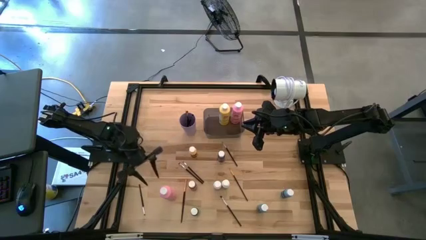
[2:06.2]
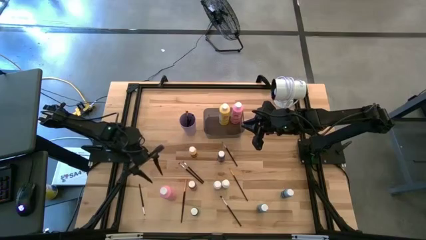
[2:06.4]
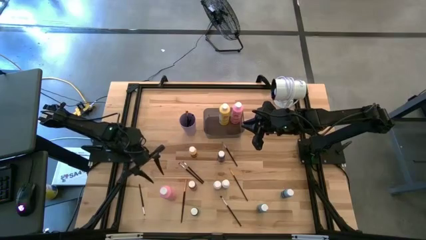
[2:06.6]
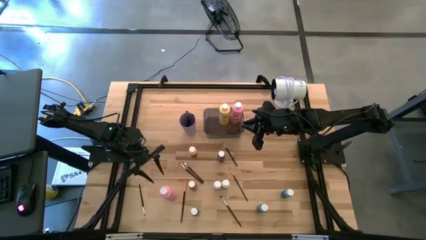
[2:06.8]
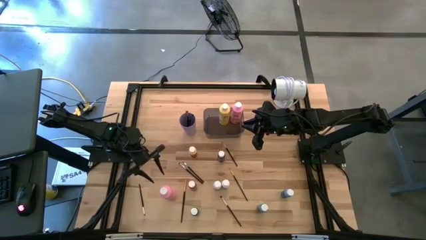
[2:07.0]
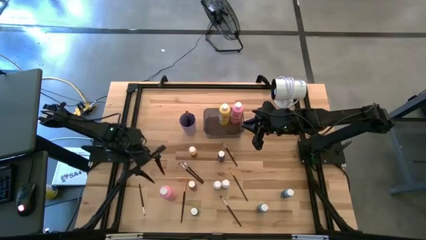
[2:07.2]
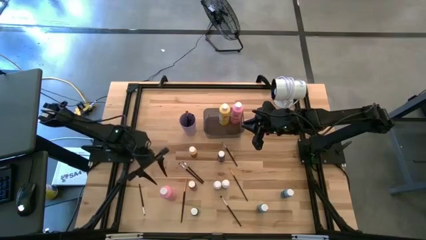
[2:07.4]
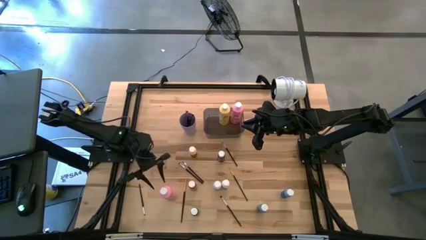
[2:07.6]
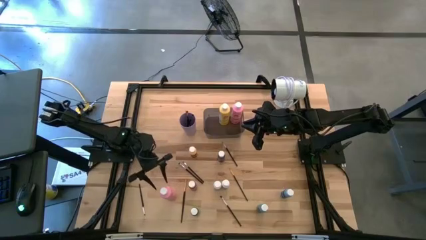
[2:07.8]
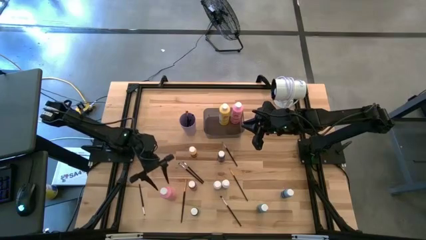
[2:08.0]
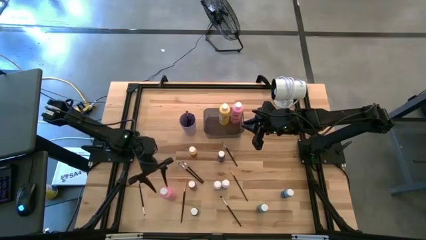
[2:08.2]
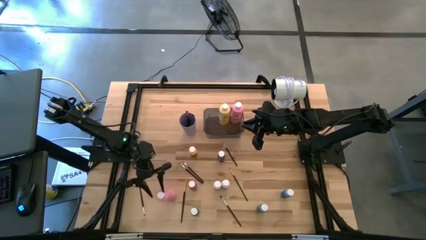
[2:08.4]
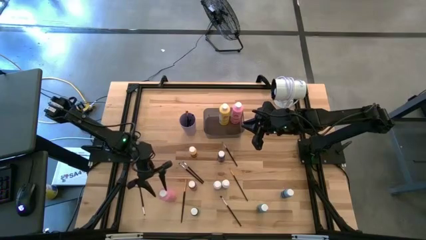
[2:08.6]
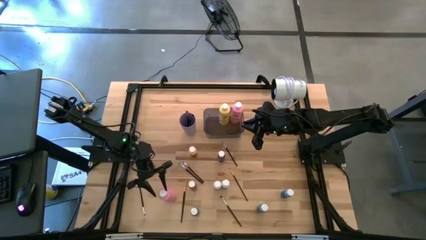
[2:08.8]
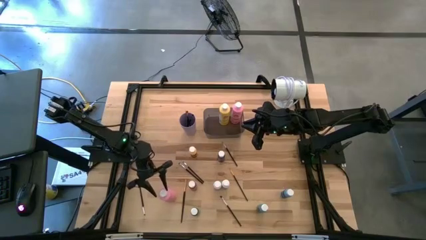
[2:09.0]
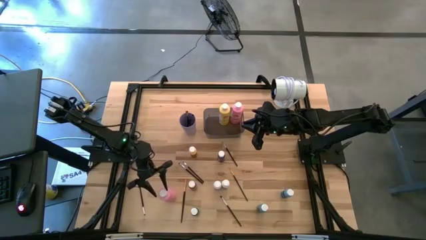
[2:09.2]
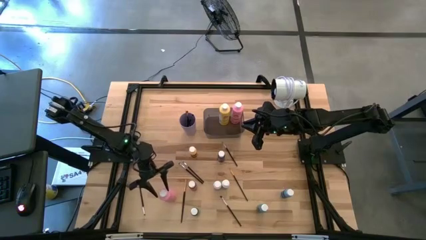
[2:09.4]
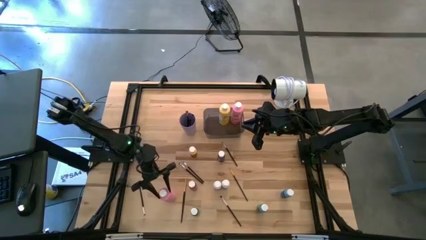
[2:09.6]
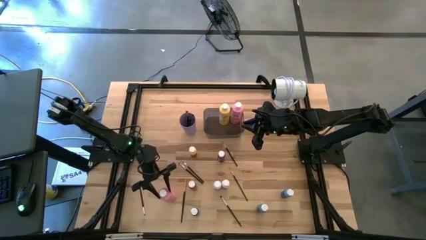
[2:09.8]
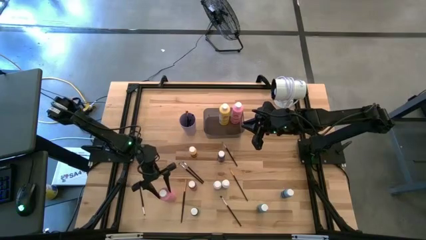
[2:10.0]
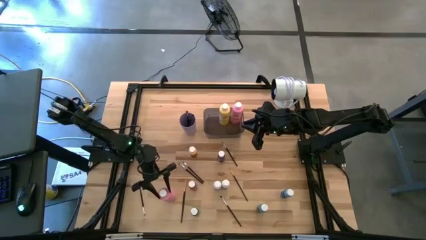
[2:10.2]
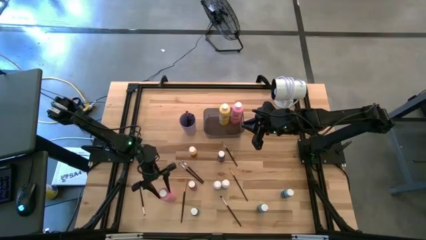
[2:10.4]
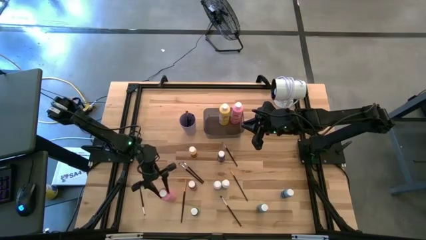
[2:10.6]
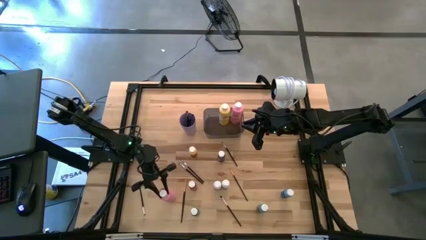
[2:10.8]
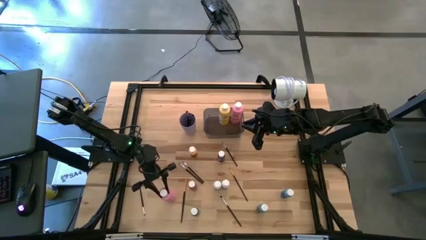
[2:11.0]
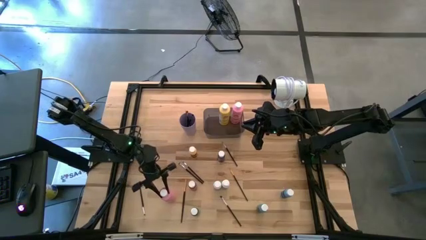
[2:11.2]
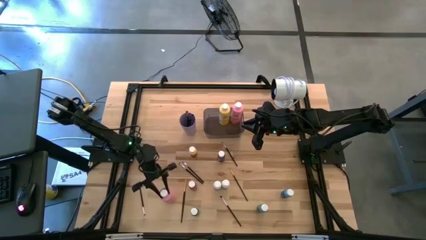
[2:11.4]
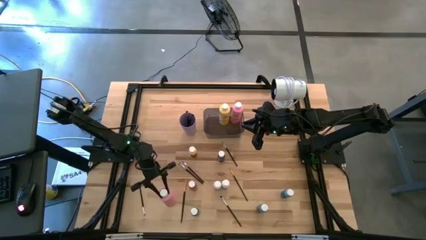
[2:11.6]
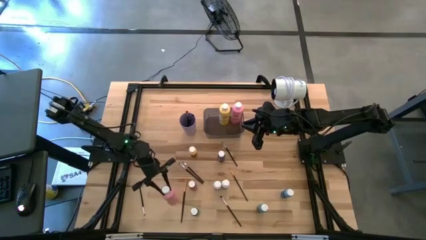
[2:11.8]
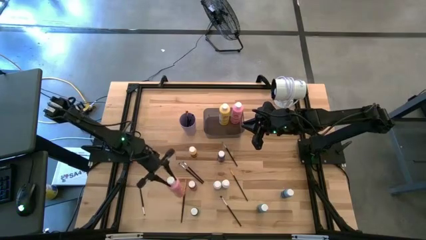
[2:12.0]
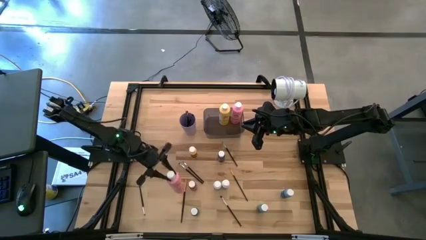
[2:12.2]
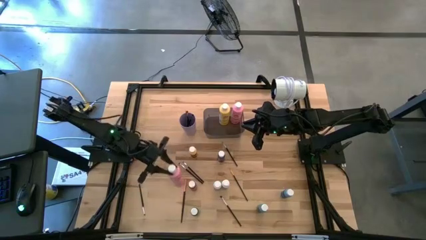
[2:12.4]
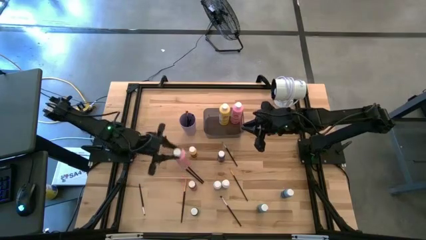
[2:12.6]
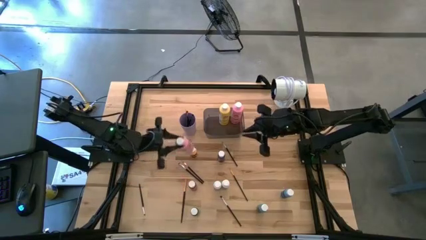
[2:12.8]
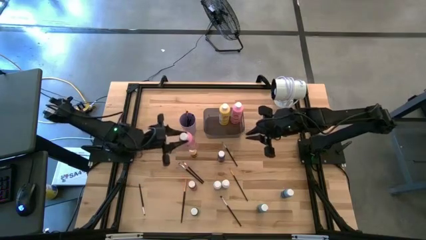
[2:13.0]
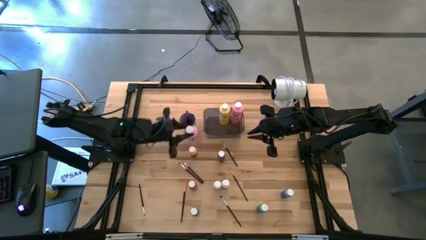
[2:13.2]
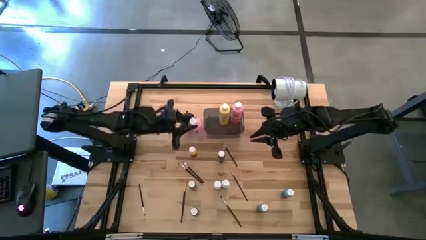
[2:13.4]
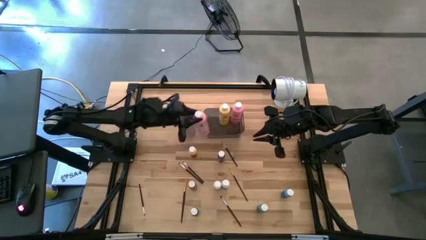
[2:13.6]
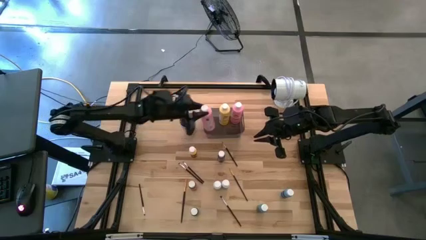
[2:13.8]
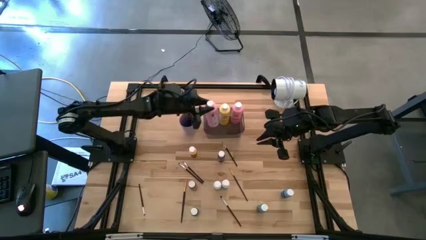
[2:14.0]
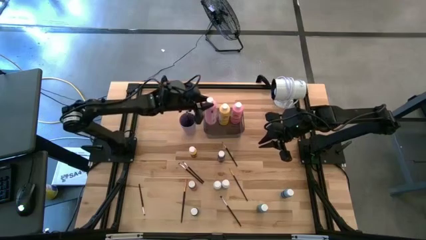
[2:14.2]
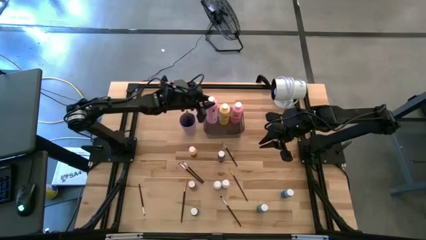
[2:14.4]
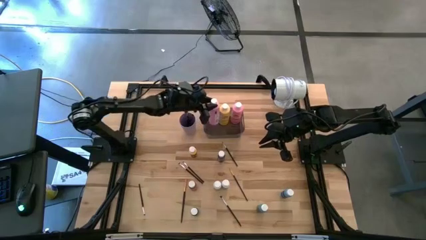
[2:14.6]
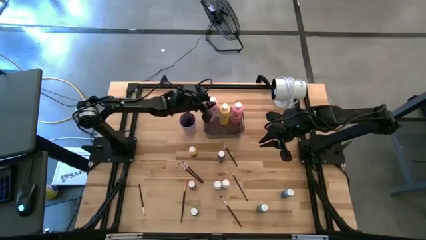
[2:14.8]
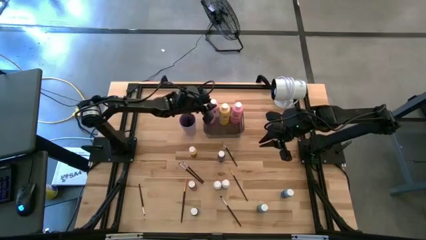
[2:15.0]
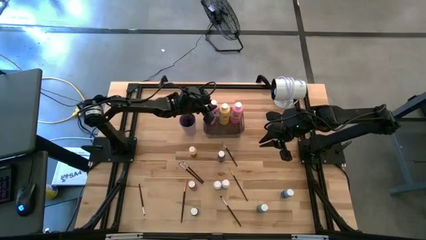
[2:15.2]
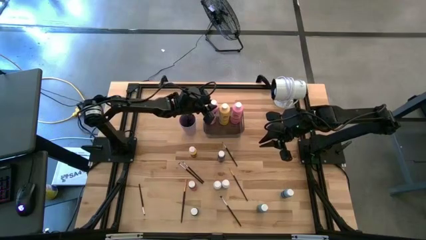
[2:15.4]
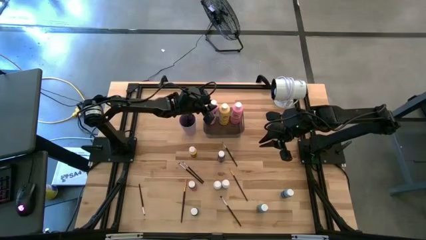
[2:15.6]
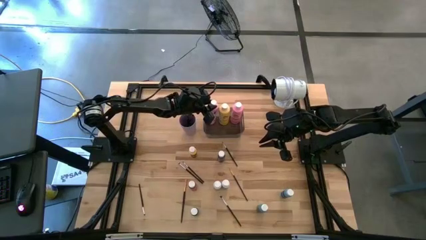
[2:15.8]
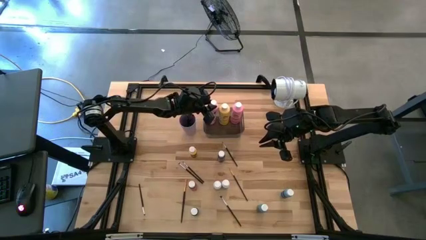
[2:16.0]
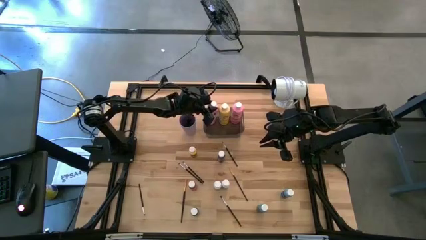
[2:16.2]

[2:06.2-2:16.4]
Task: Pick & Place Paint Supplies
Put the big pink paint bottle into the gray bin

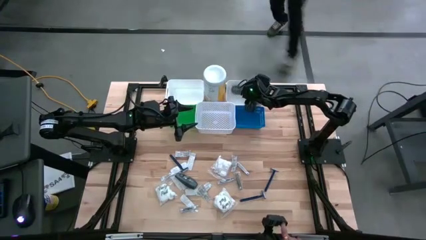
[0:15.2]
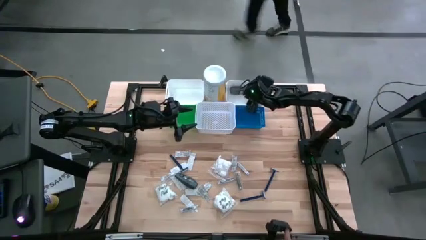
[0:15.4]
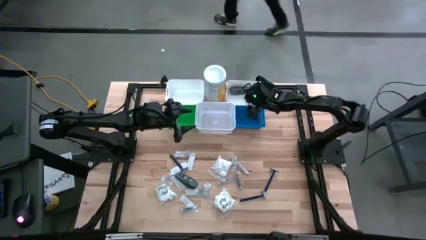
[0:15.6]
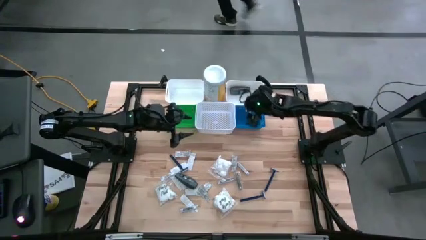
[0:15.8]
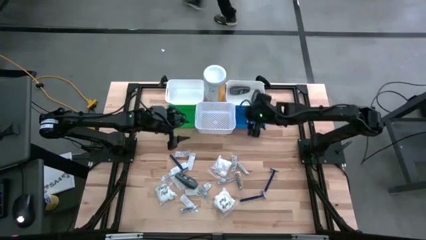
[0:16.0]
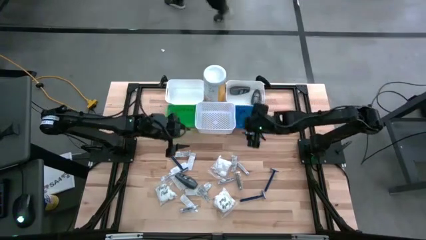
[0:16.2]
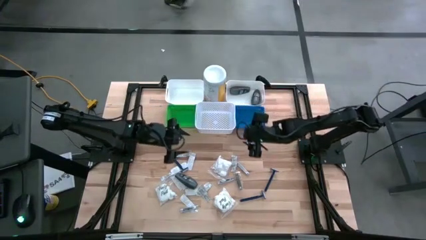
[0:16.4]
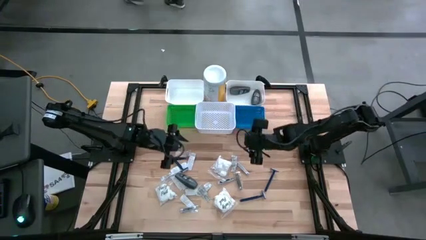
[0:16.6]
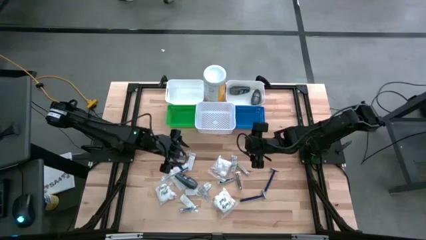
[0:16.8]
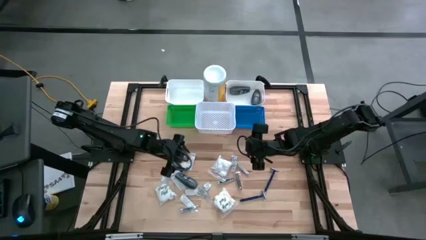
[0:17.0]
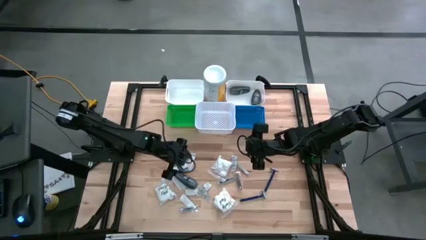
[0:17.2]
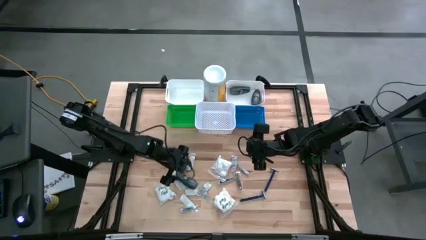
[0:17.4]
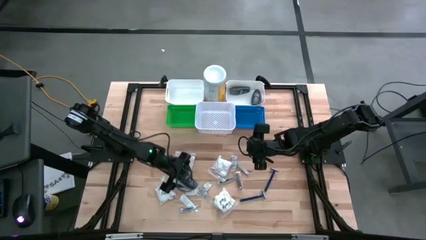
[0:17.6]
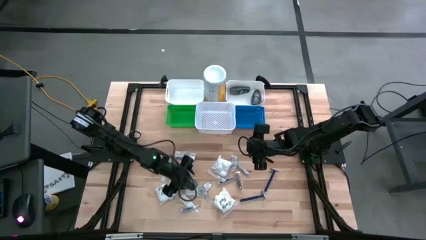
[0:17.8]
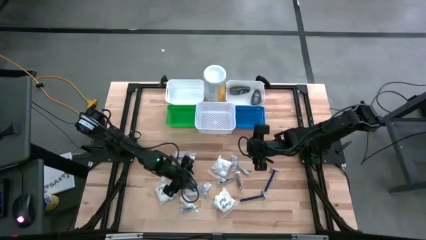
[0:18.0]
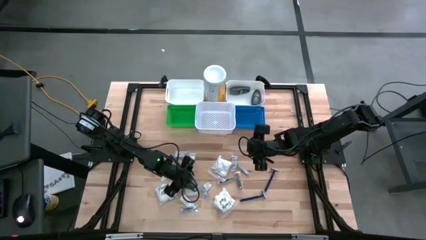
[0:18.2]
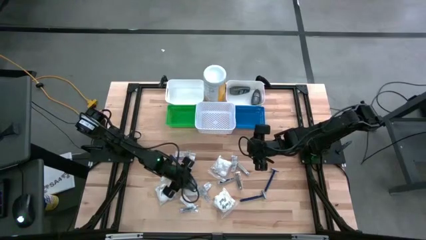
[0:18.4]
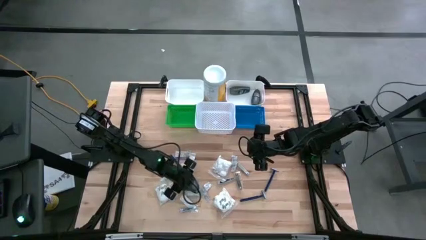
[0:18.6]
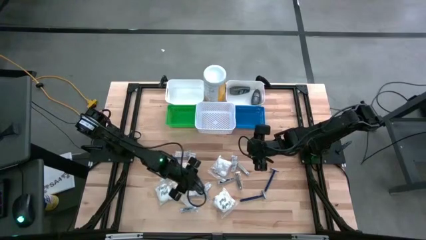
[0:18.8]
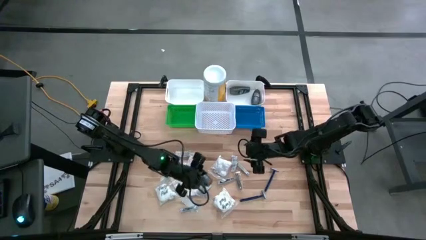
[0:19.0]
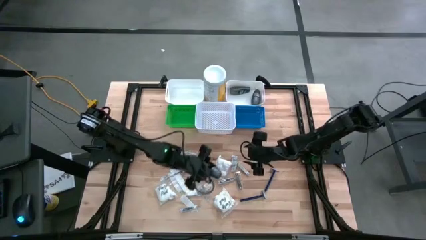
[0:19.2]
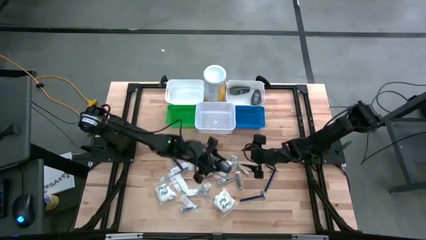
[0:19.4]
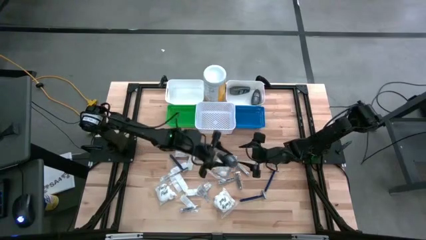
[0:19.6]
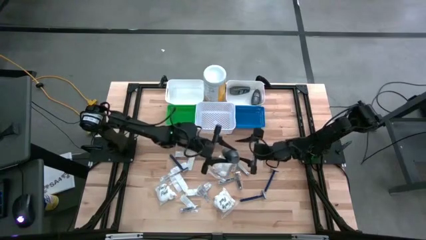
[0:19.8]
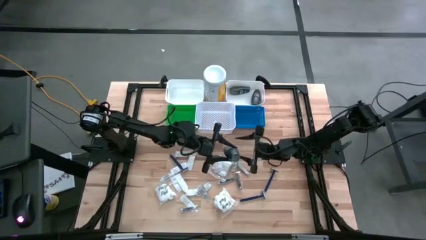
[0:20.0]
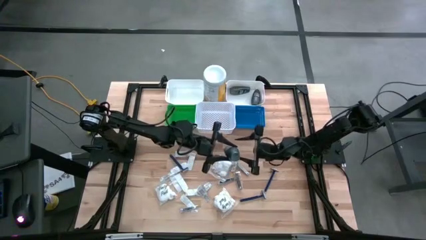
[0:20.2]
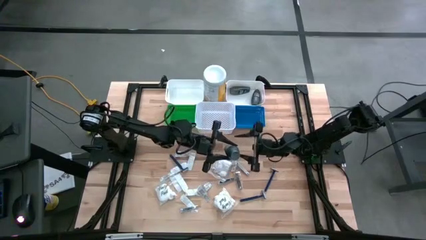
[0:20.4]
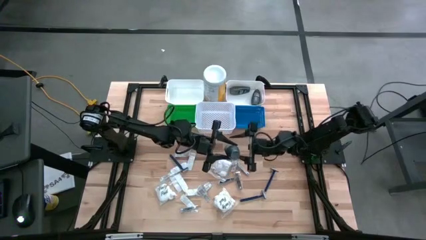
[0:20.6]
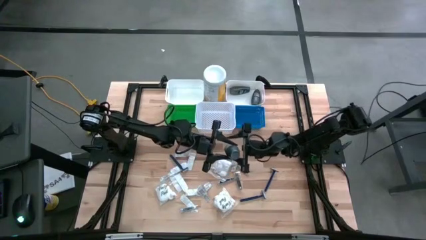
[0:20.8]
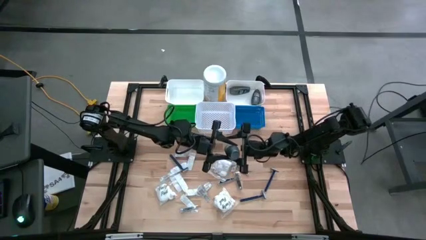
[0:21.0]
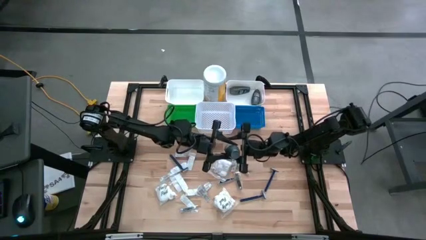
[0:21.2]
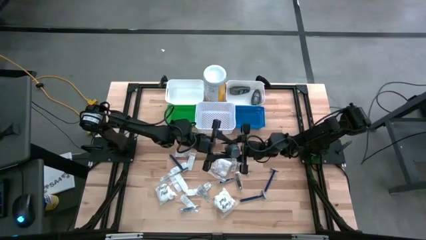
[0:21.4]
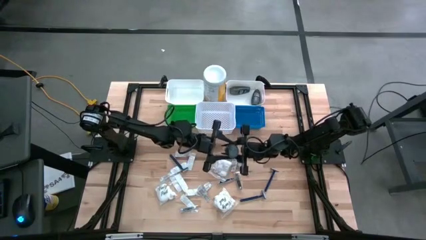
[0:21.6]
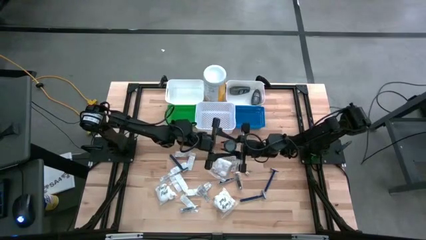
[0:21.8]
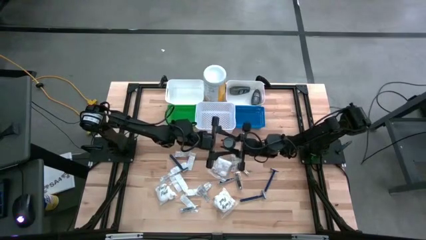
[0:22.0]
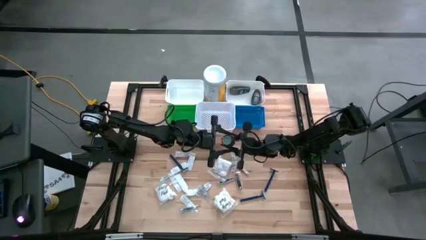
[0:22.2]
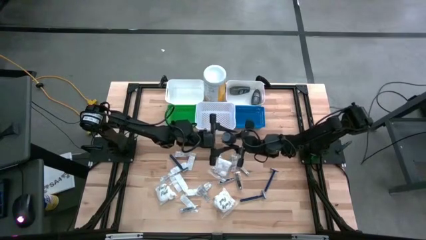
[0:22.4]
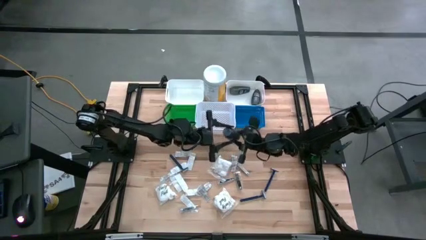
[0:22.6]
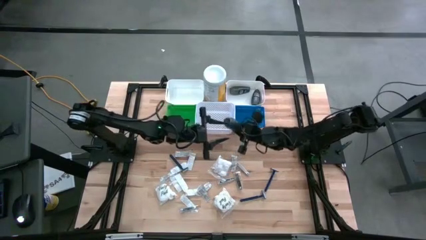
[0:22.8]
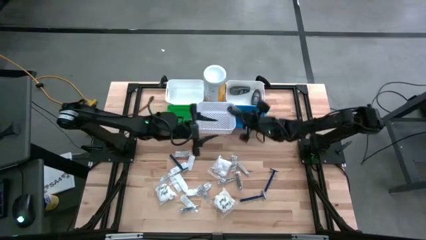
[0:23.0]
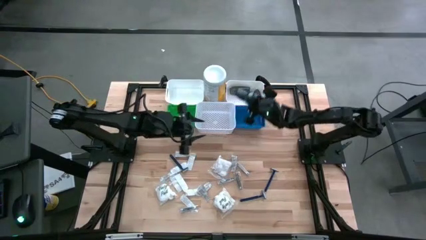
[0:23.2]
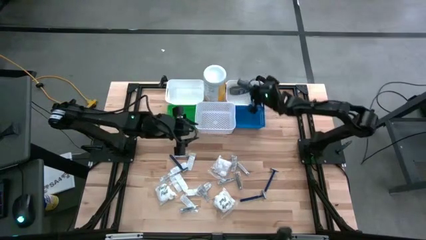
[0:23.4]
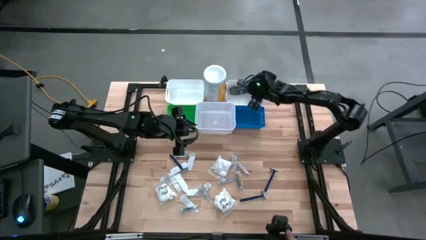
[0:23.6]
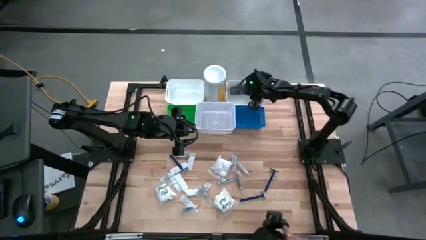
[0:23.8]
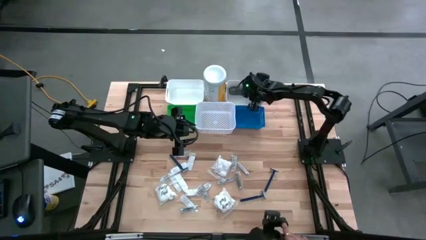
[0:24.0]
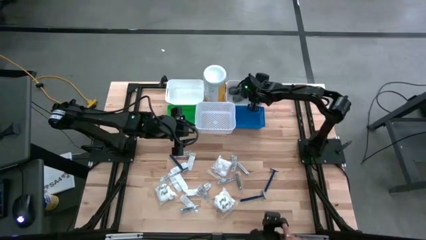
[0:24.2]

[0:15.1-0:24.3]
Task: Pick & Place Travel size toiletries
Put the black deodorant into the top right white bin
